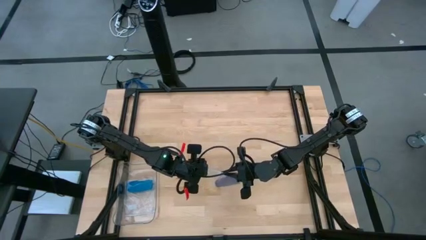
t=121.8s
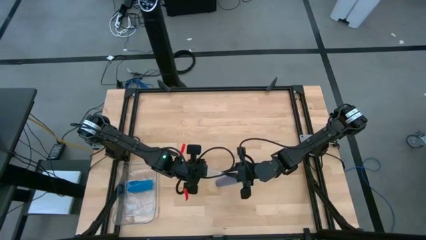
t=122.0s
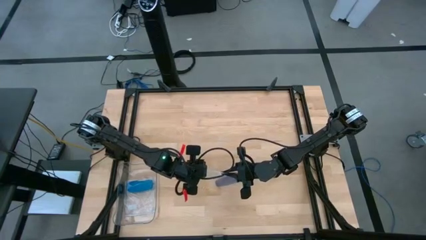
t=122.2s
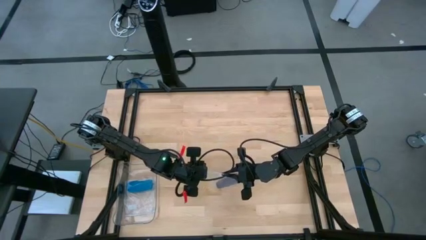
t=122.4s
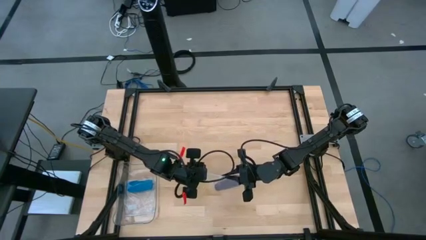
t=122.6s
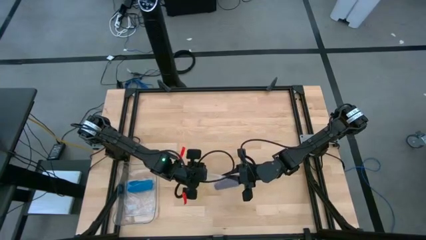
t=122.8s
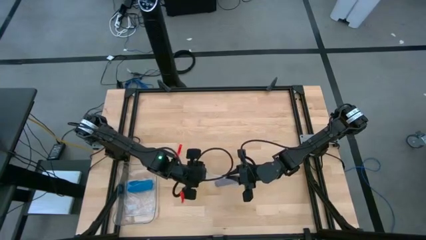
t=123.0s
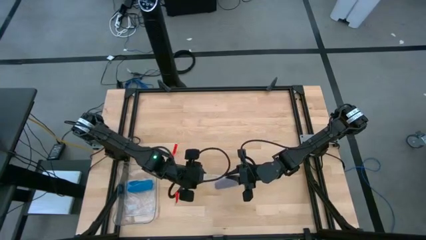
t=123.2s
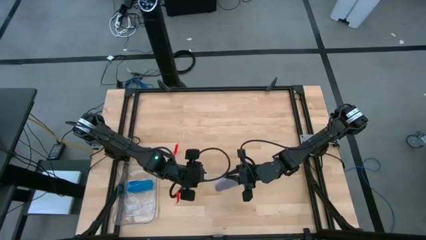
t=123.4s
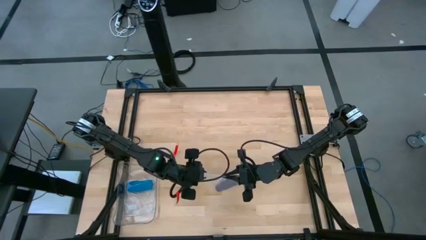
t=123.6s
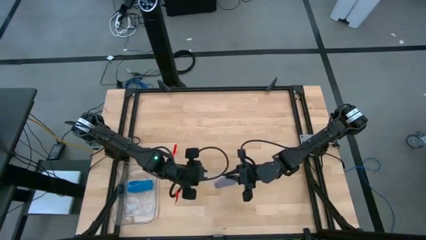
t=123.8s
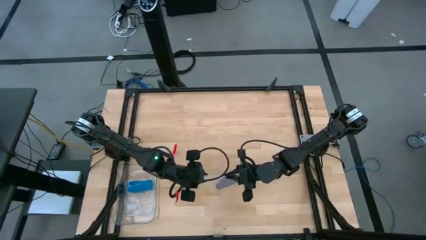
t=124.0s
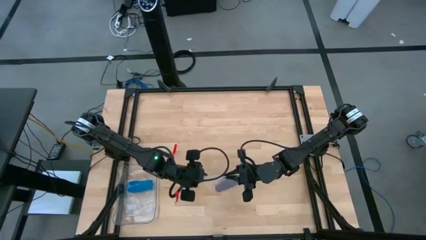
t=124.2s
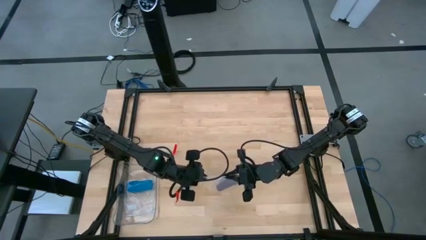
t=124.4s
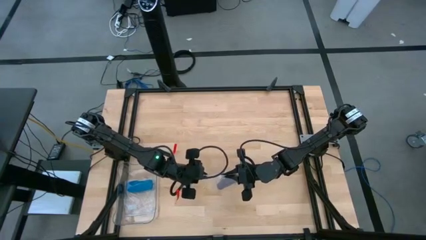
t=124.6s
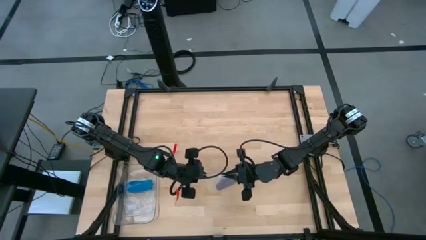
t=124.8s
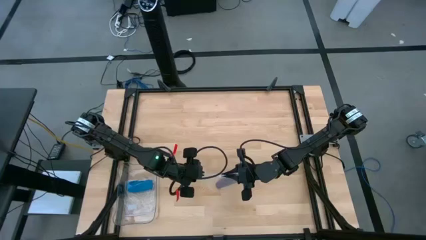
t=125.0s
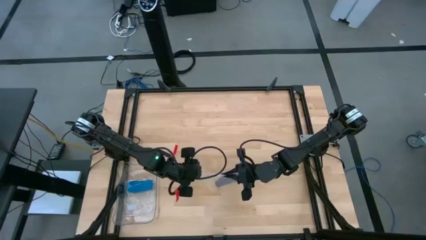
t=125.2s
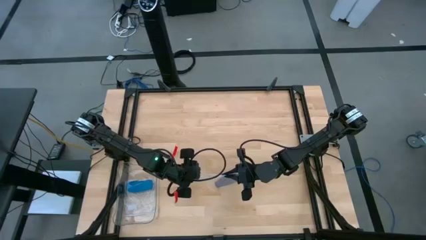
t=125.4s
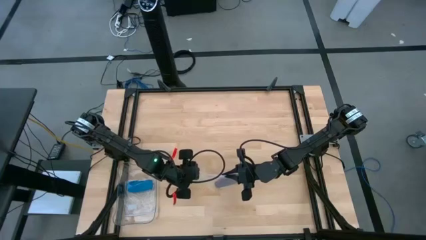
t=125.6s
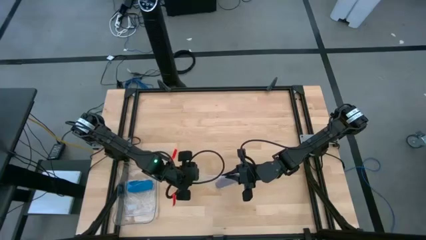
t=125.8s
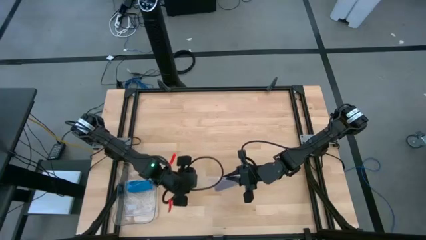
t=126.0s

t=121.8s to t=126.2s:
Task: Roll bandage
Close the transparent zip bag

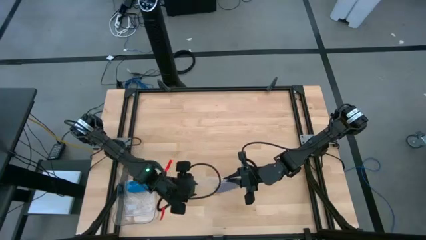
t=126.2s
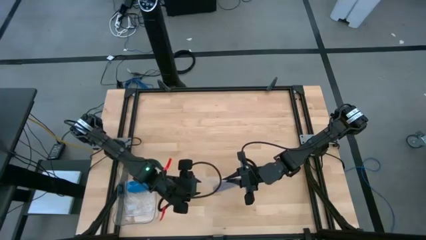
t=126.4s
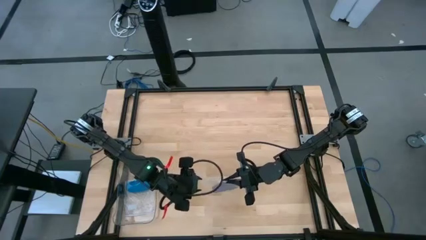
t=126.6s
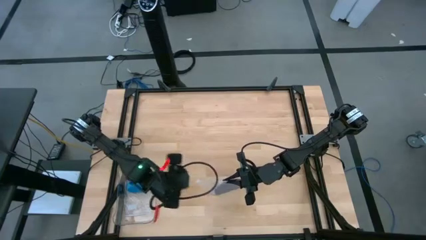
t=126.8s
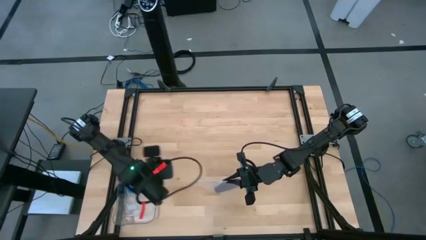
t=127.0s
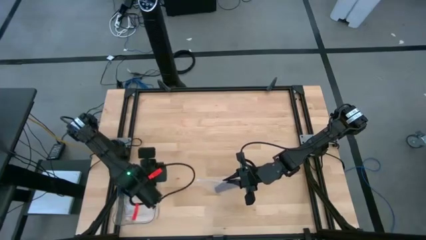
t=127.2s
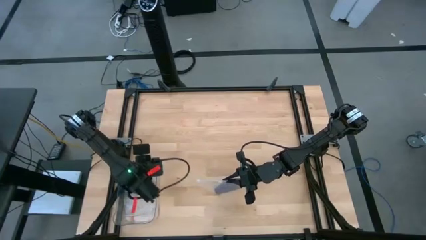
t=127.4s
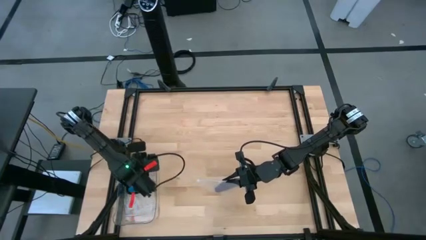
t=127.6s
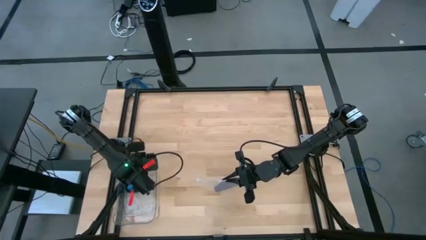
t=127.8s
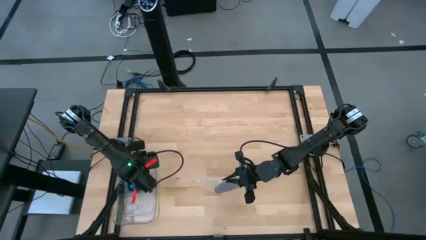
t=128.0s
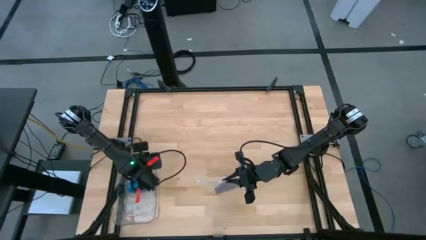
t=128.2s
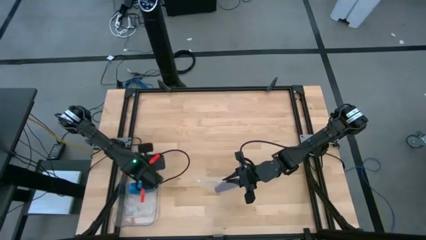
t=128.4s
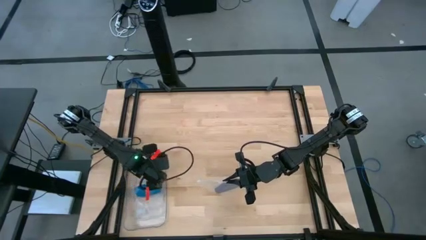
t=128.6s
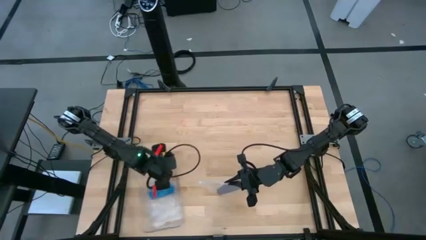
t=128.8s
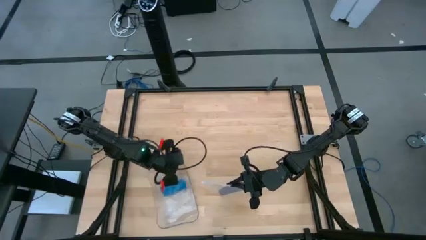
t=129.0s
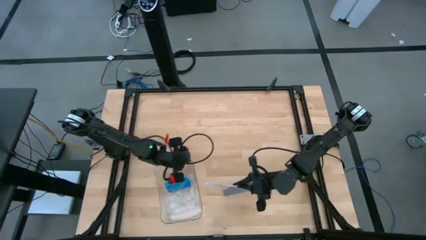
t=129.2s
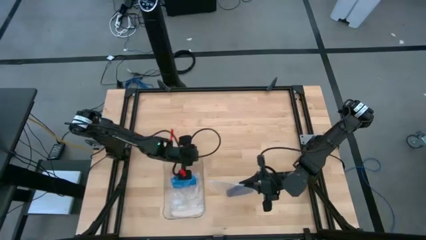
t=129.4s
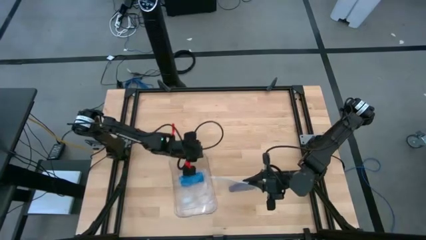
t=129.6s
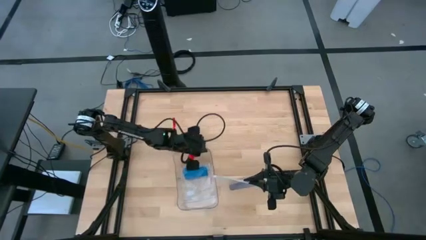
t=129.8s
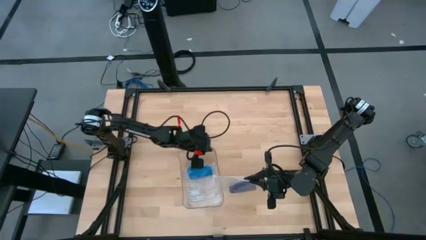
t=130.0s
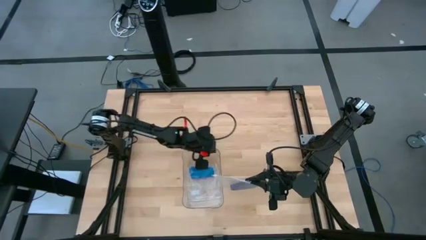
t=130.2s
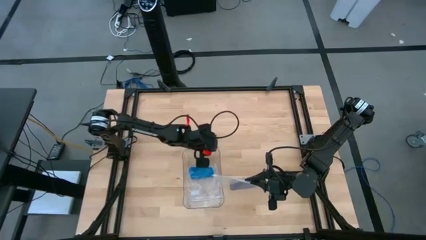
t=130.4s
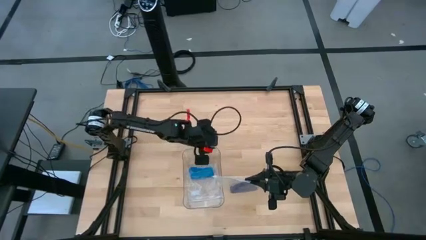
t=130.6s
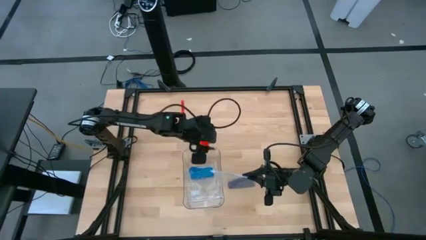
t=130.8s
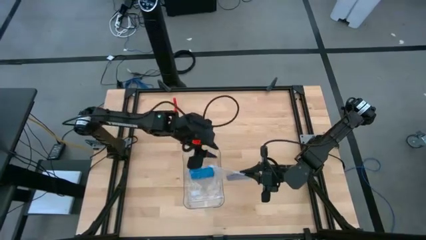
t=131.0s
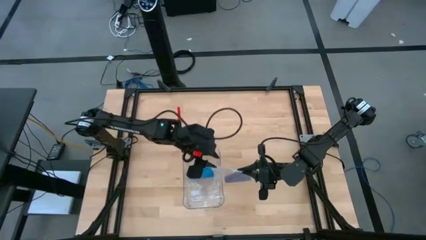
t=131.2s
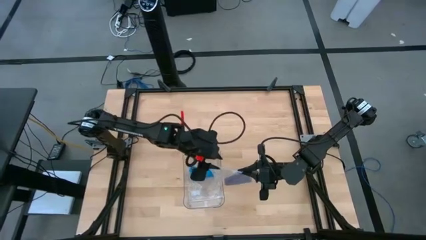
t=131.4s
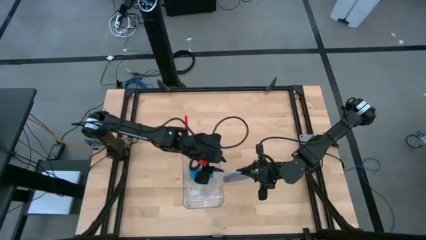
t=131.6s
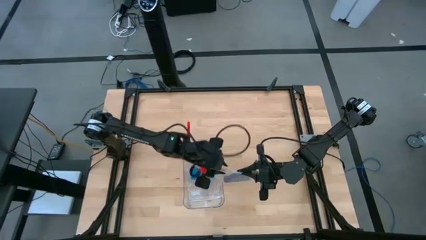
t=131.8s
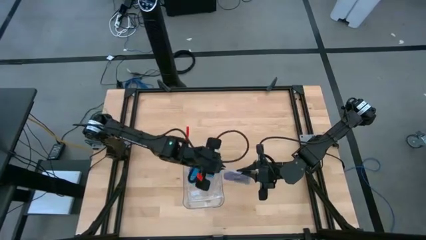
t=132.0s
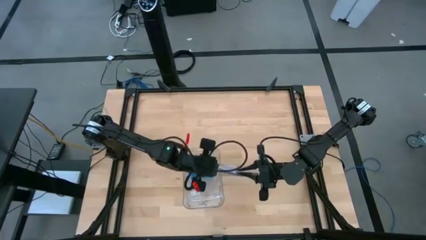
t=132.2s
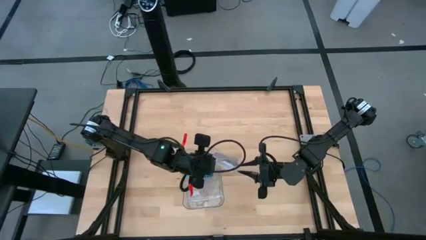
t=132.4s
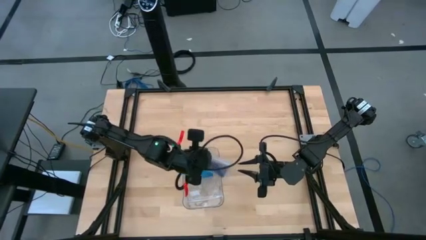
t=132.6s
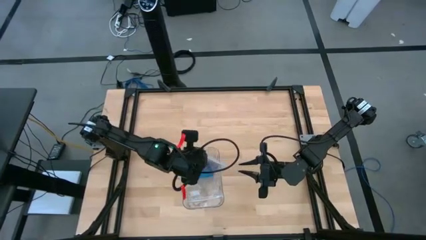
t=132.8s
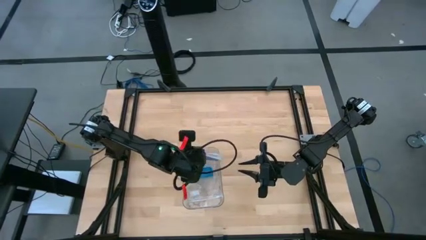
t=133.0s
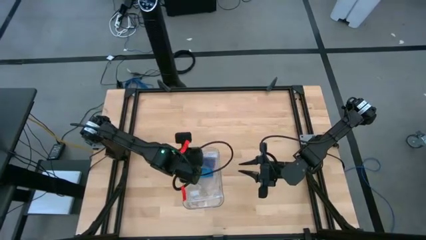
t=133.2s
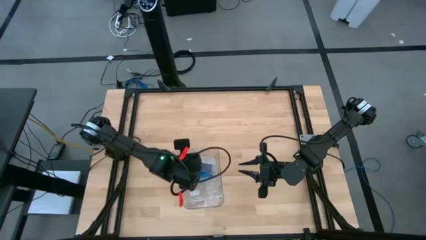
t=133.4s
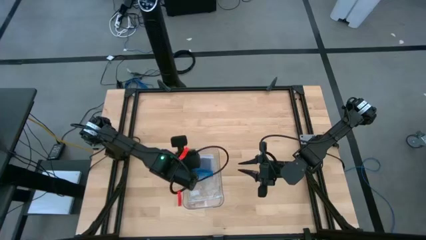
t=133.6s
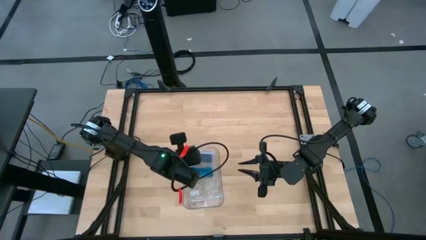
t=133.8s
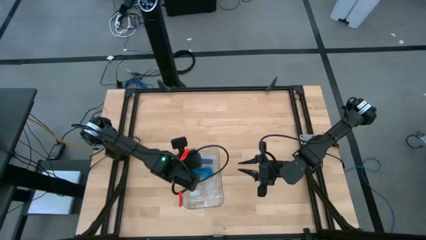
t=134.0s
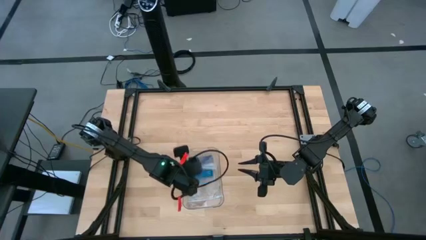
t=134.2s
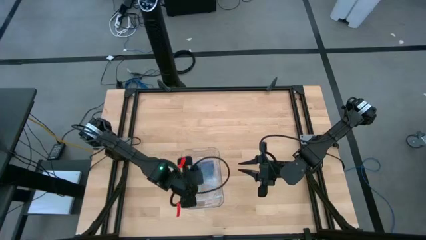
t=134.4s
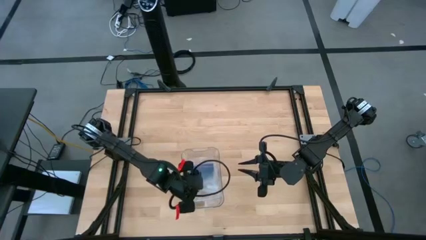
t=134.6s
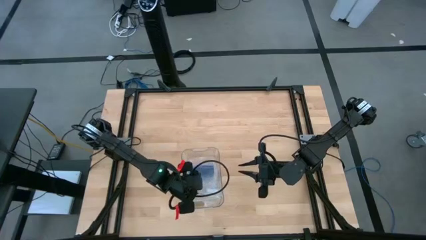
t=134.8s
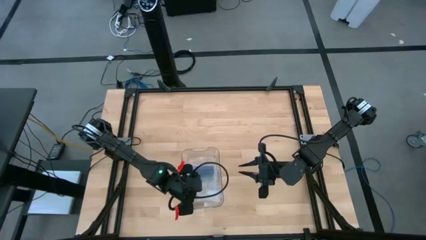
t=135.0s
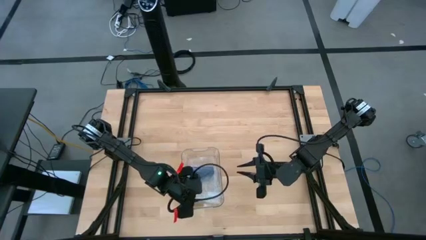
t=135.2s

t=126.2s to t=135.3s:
Put the transparent zip bag into the transparent bin
